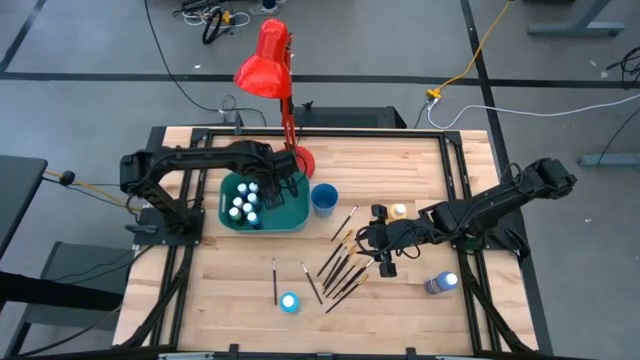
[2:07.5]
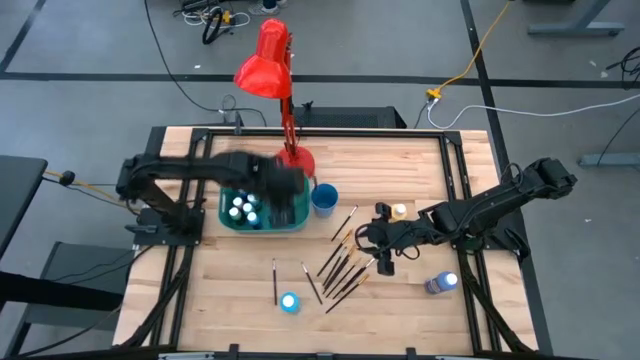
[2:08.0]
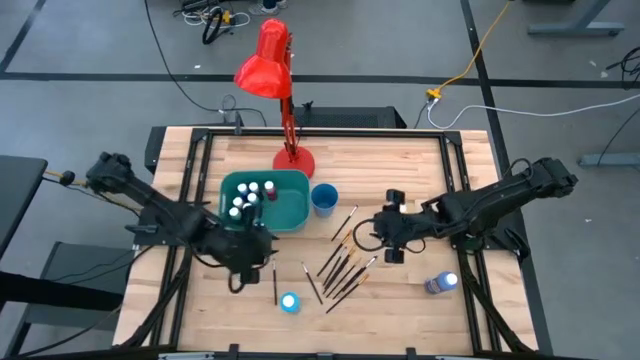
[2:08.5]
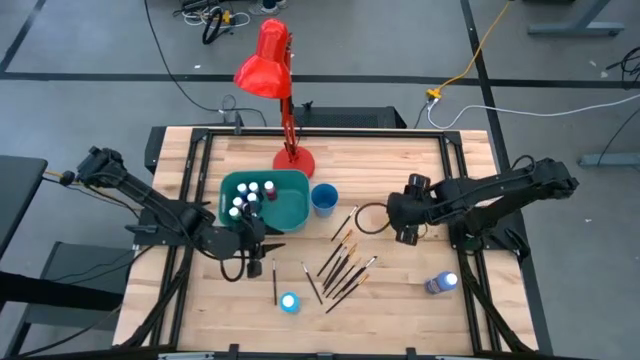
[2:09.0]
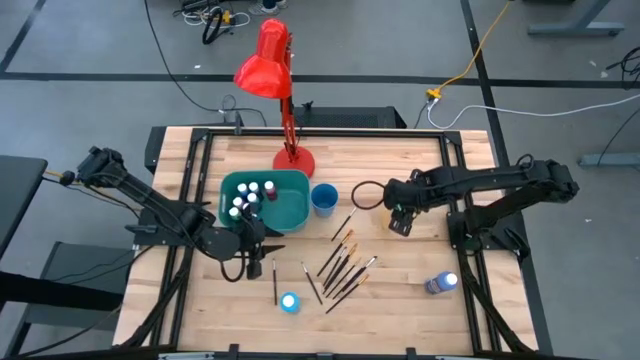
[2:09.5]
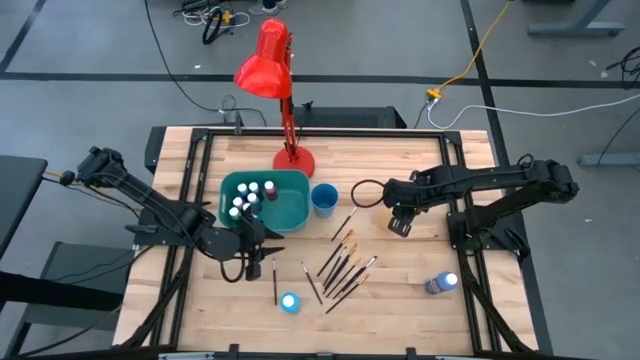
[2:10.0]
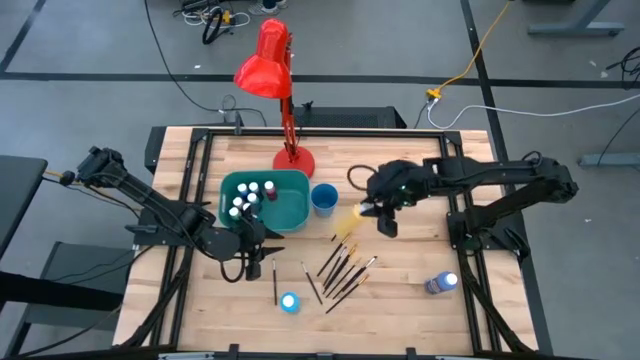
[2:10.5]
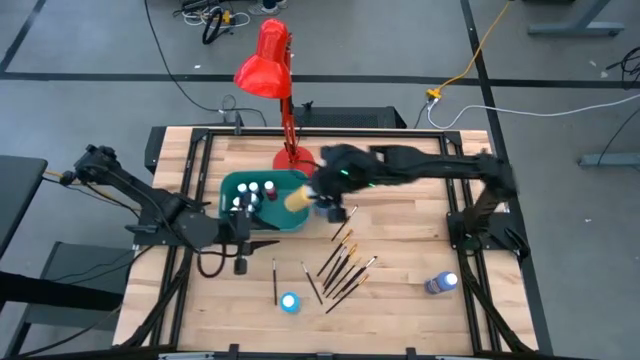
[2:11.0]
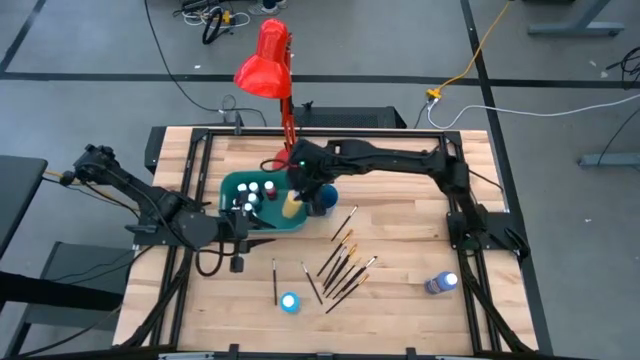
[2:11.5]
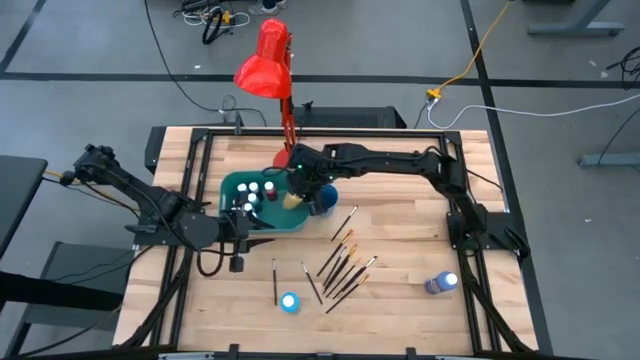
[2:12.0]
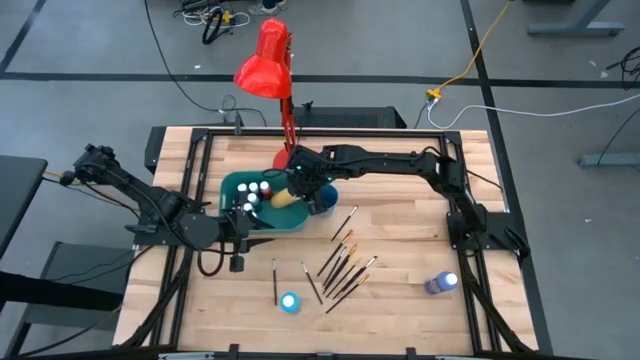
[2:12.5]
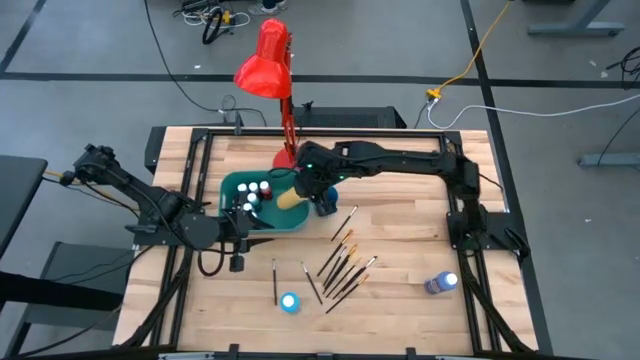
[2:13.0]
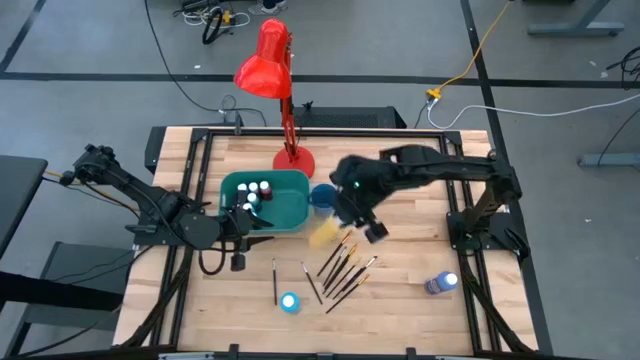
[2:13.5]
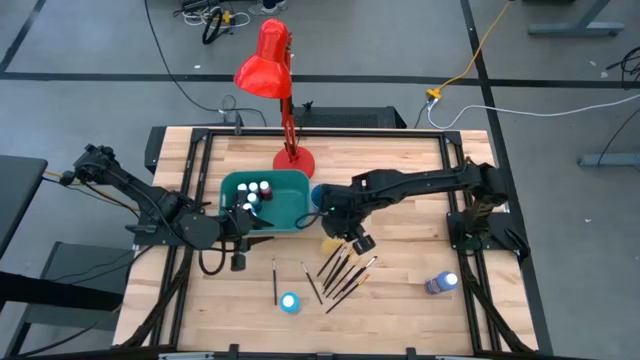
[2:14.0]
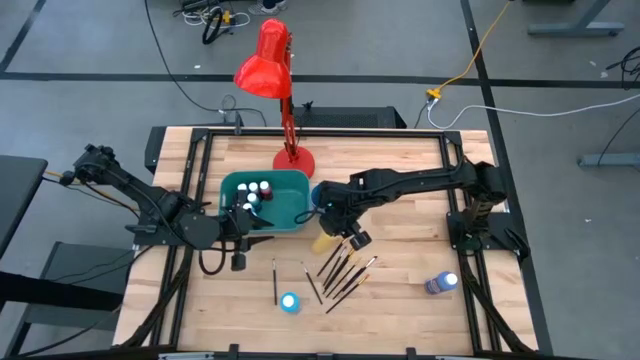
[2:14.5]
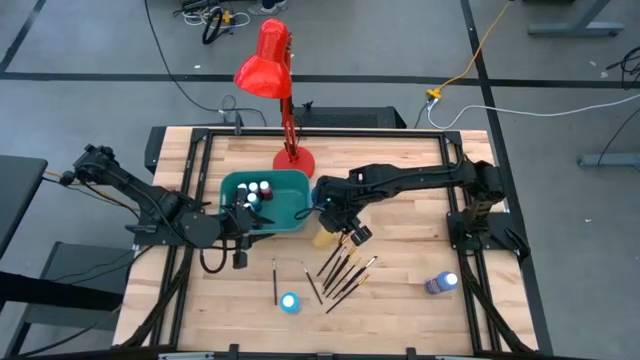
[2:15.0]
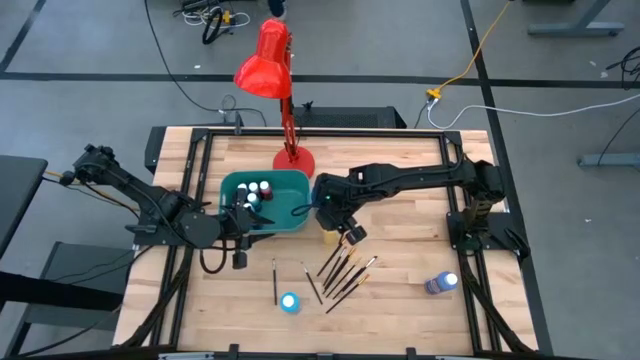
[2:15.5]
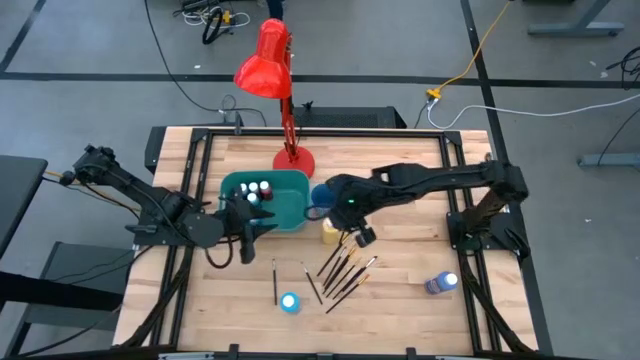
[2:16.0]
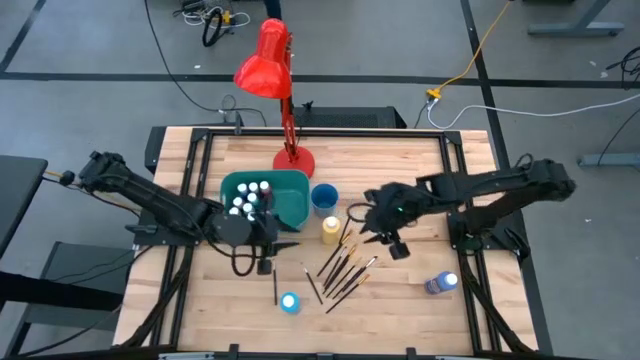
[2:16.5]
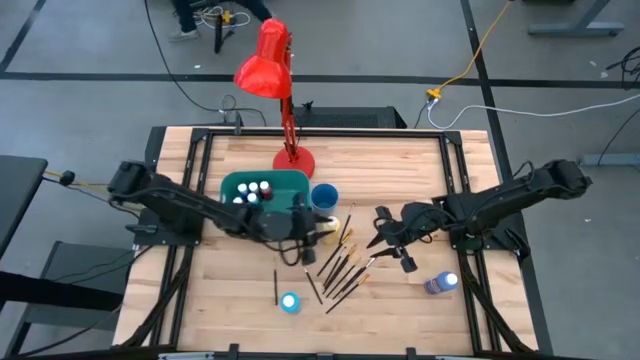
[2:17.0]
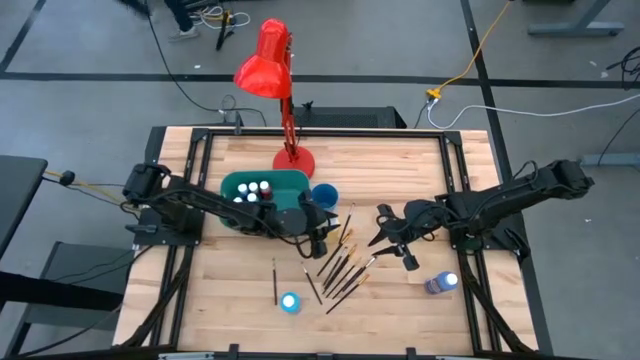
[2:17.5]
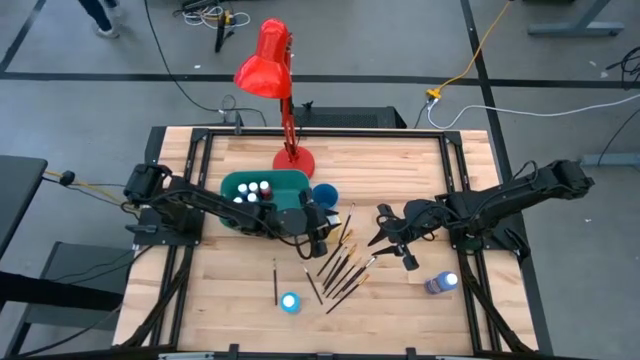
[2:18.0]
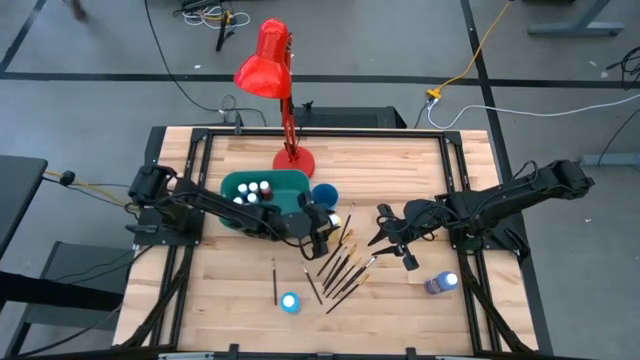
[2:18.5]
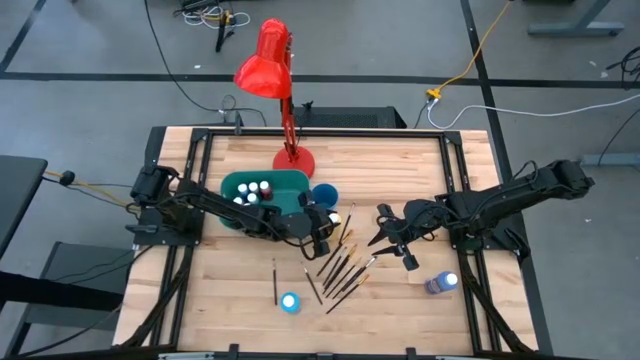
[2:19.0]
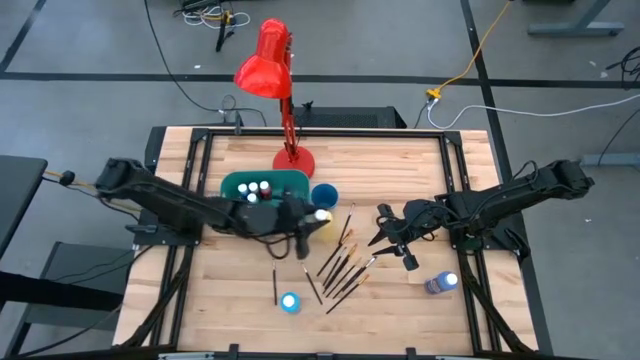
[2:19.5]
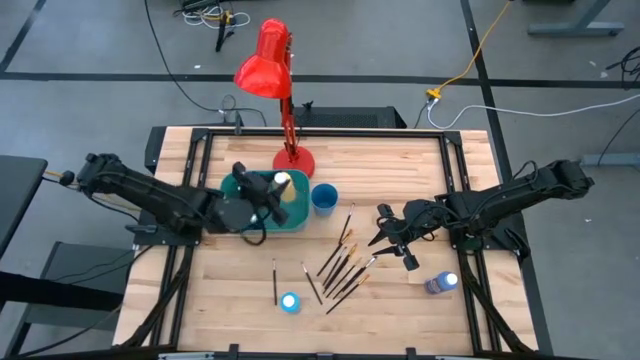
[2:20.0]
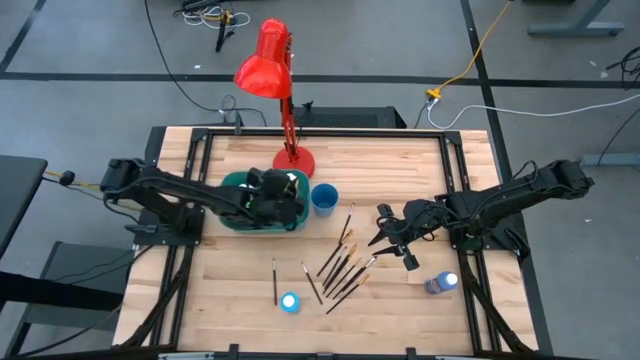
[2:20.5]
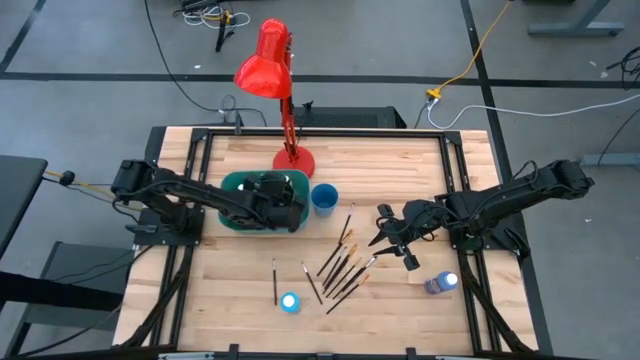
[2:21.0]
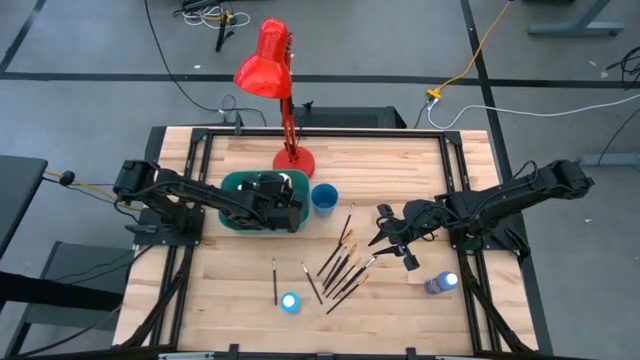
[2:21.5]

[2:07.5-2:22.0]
Task: Pick & Place Paint Supplies
Put the yellow paint bottle into the green bin

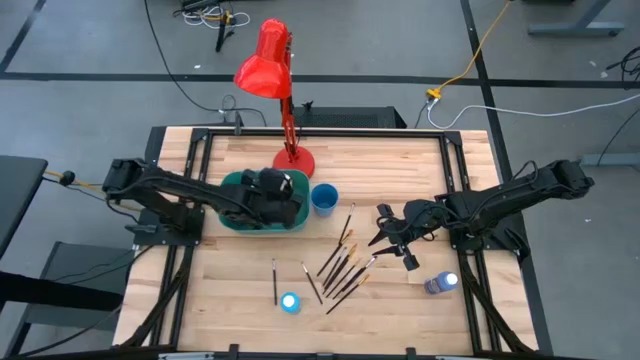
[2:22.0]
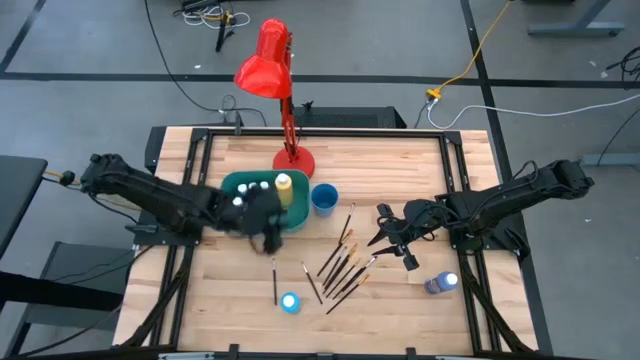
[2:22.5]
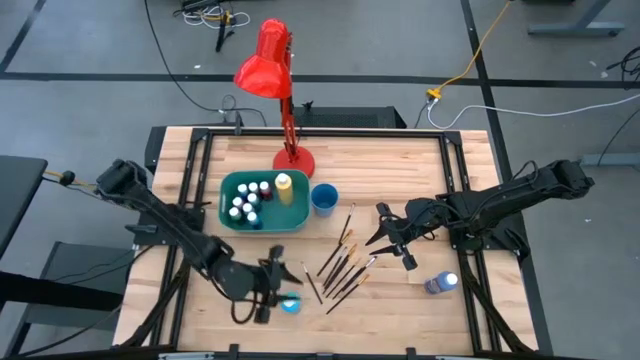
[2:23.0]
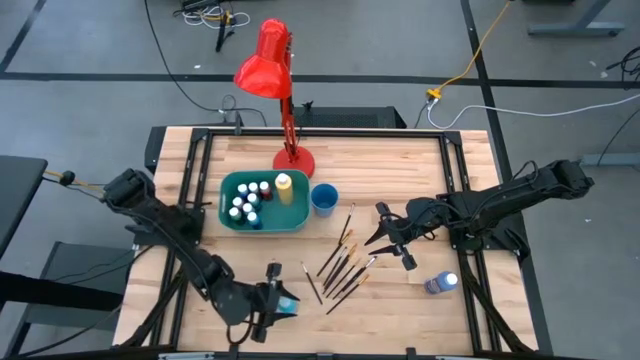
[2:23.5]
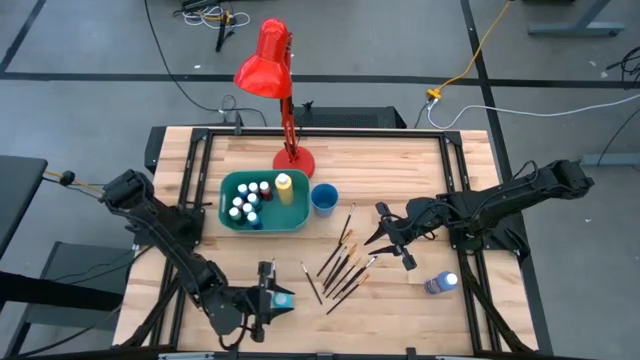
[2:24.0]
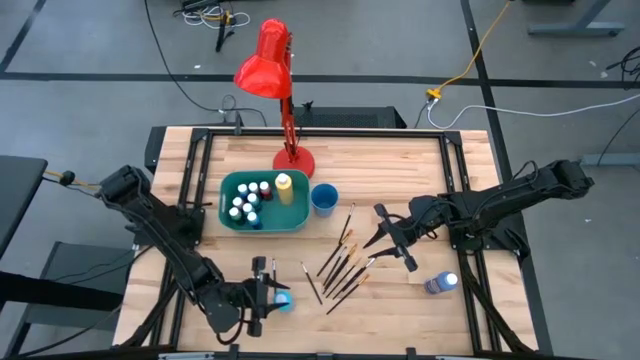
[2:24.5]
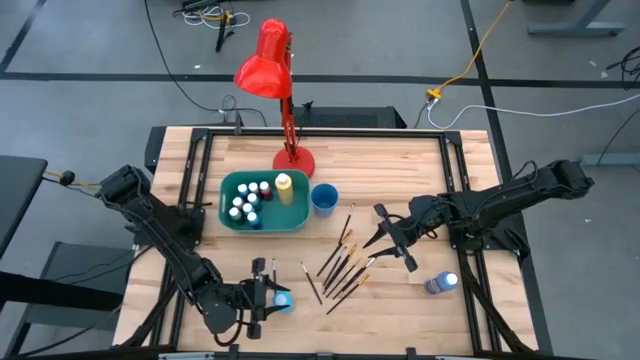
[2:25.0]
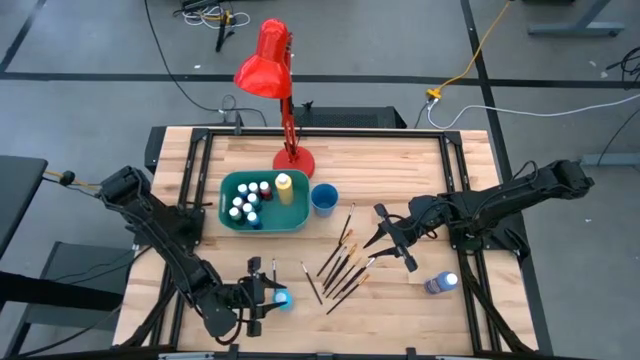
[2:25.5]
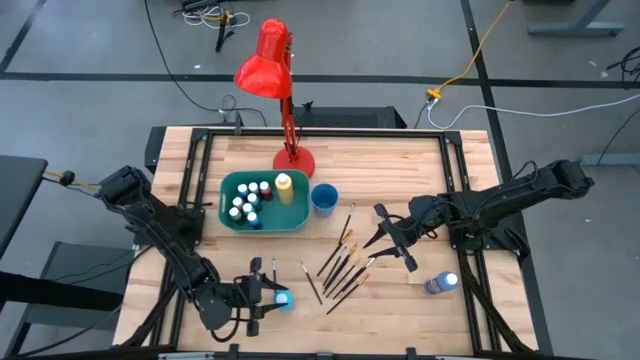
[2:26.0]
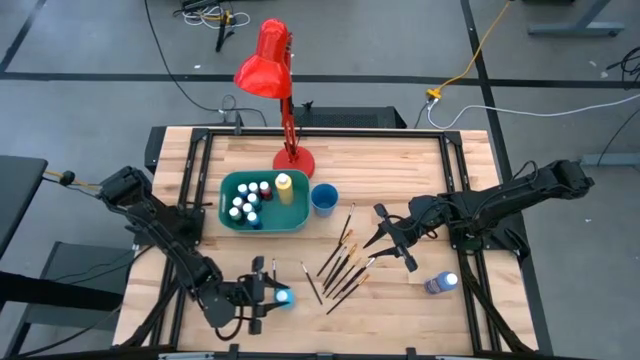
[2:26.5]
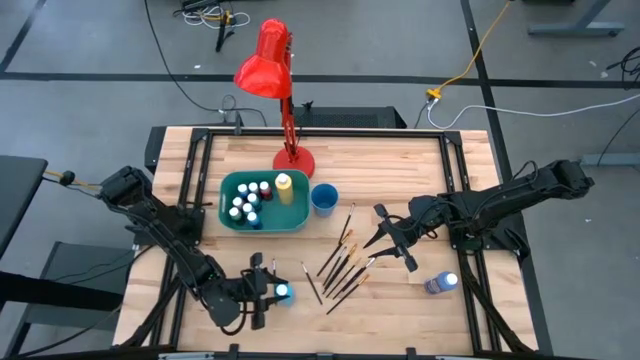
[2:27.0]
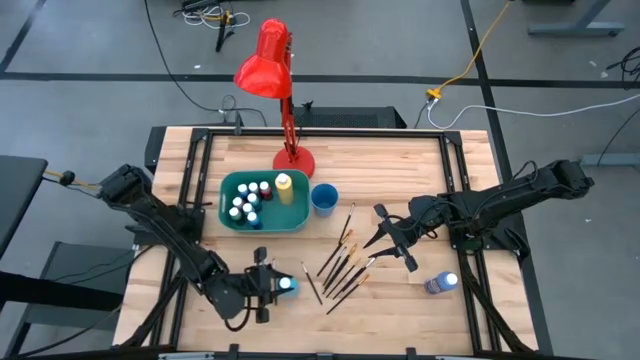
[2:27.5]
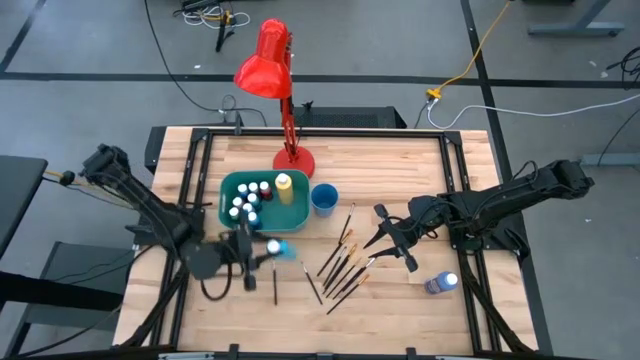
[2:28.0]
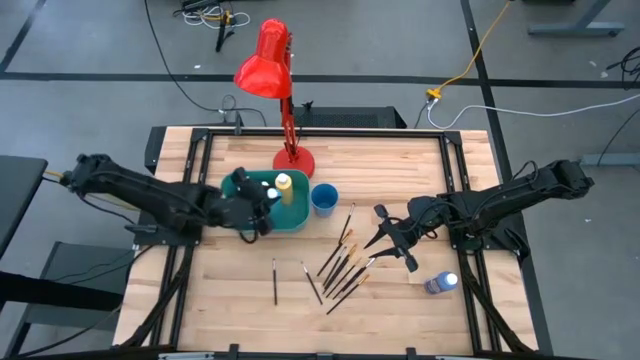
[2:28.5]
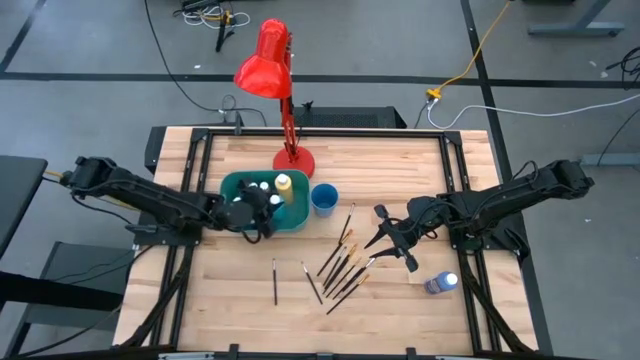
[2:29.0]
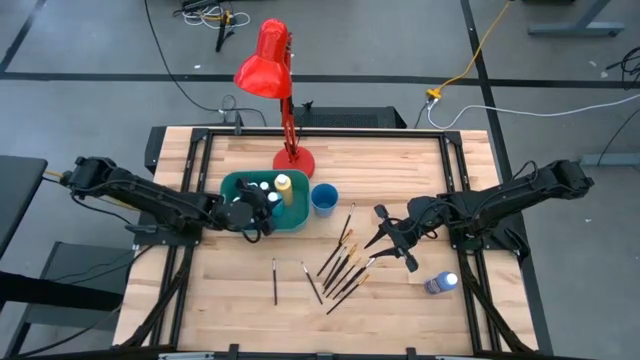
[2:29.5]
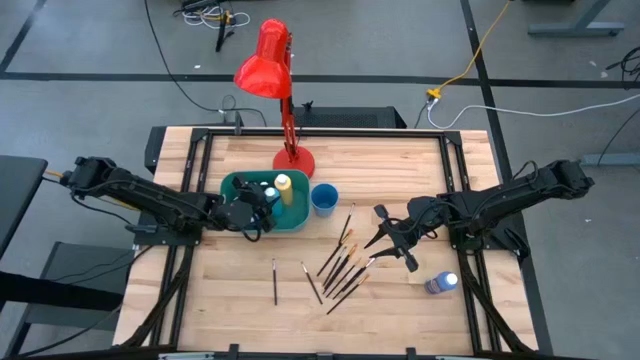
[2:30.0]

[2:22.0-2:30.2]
Put the light blue paint bottle into the green bin
